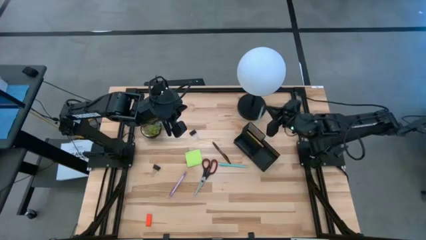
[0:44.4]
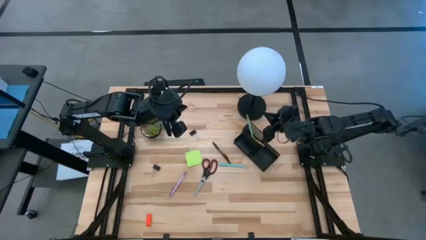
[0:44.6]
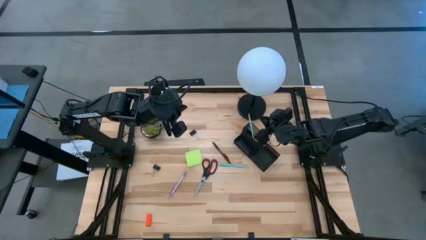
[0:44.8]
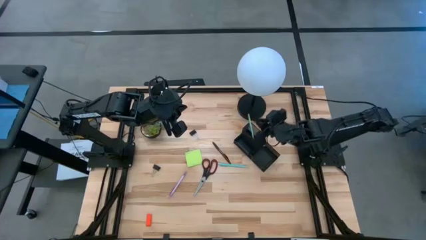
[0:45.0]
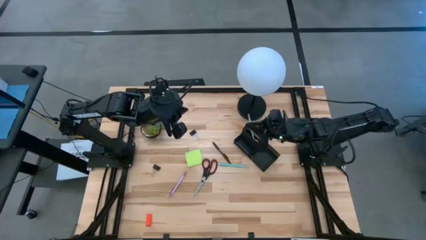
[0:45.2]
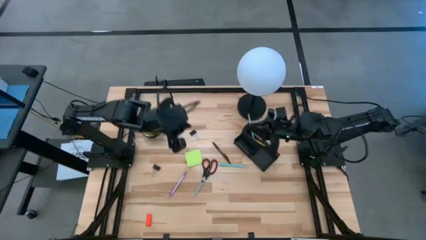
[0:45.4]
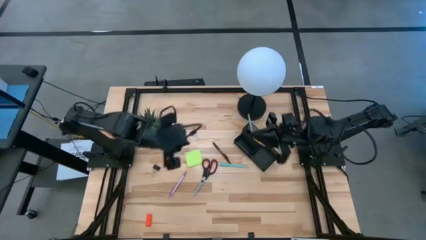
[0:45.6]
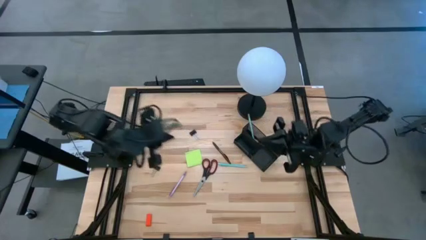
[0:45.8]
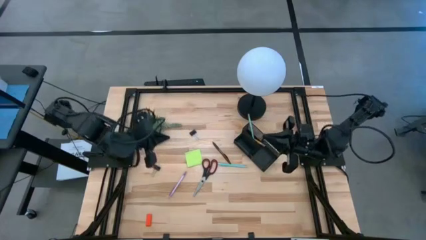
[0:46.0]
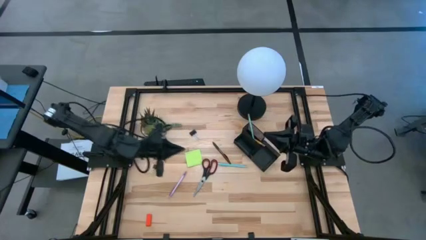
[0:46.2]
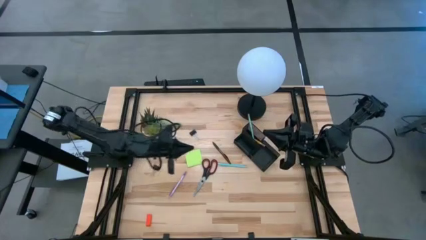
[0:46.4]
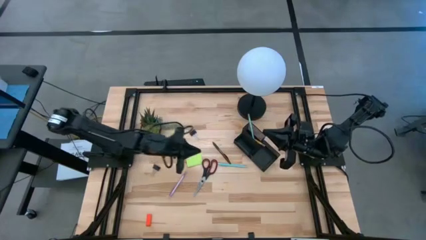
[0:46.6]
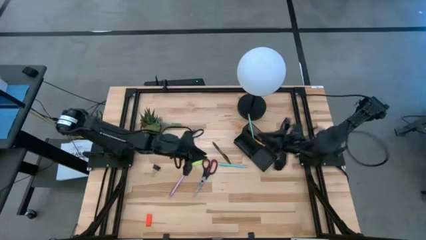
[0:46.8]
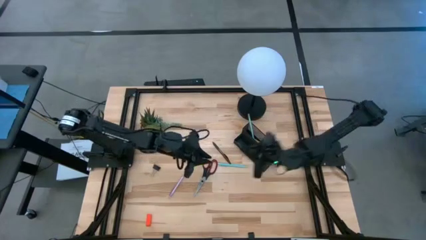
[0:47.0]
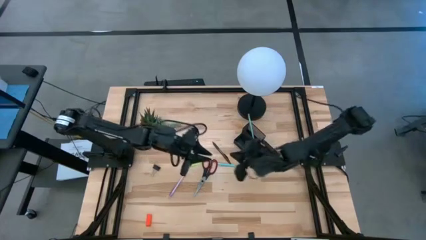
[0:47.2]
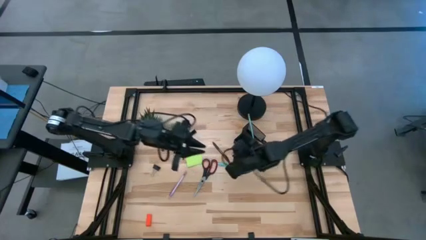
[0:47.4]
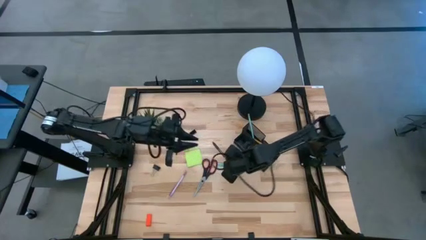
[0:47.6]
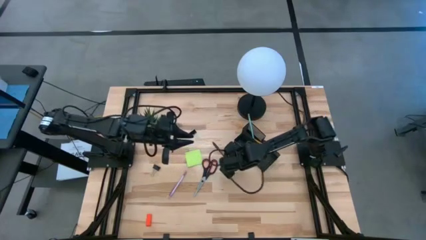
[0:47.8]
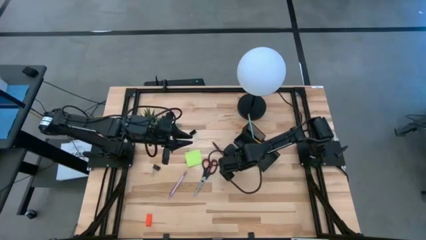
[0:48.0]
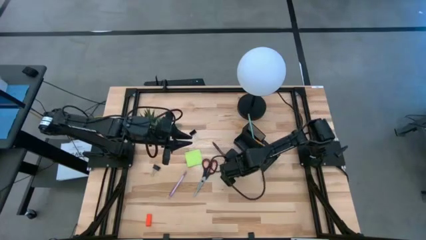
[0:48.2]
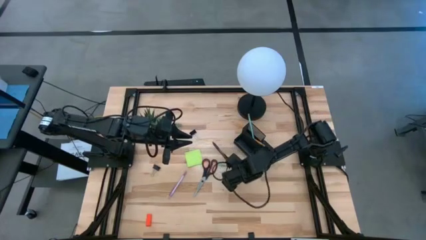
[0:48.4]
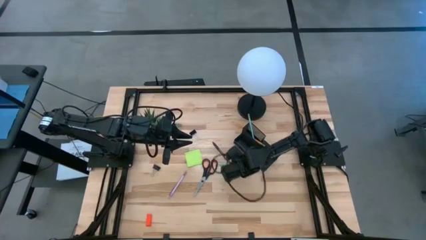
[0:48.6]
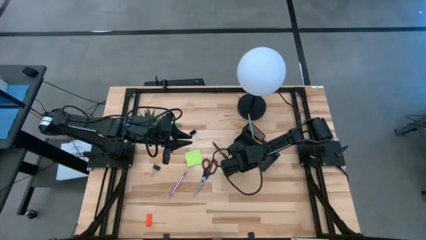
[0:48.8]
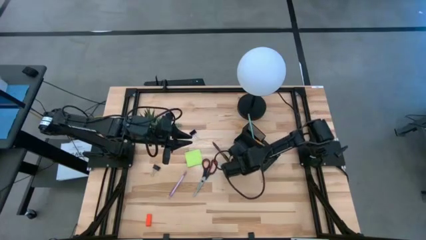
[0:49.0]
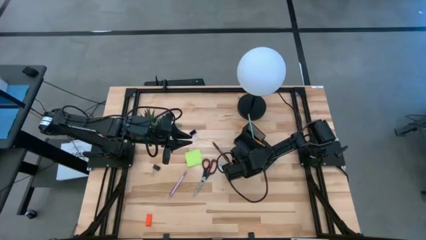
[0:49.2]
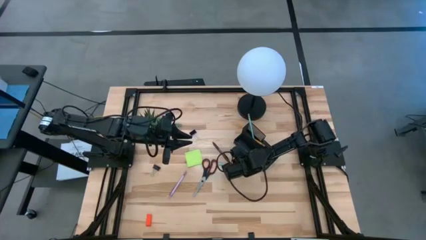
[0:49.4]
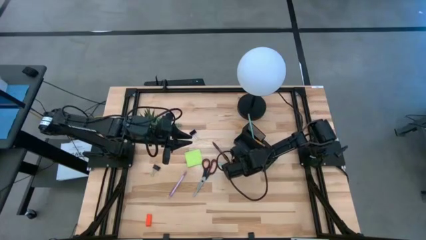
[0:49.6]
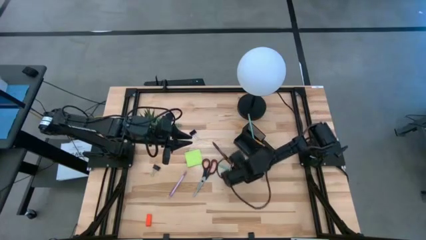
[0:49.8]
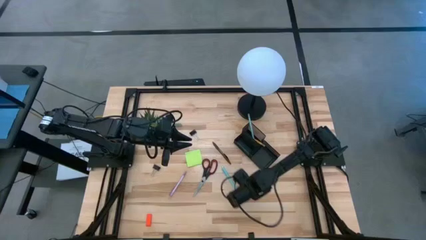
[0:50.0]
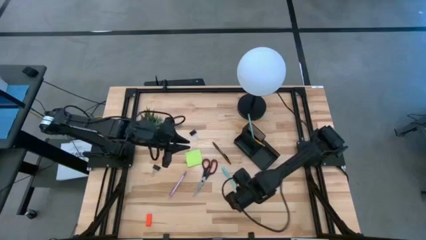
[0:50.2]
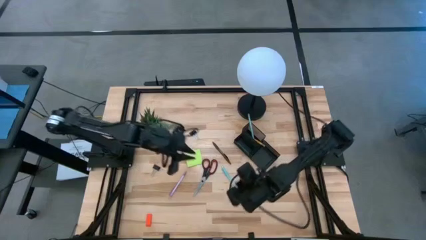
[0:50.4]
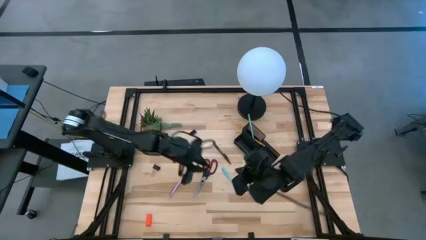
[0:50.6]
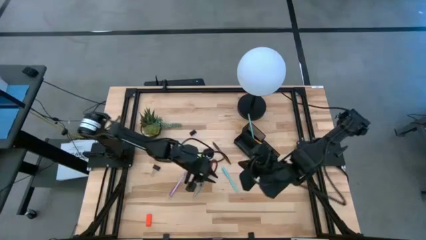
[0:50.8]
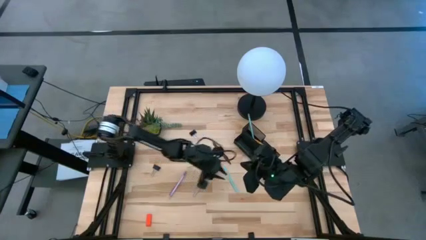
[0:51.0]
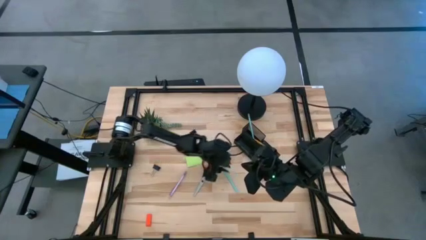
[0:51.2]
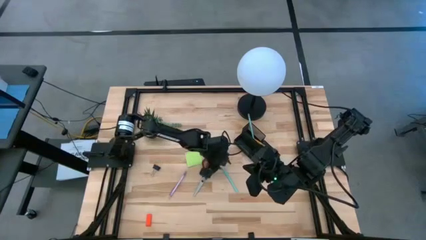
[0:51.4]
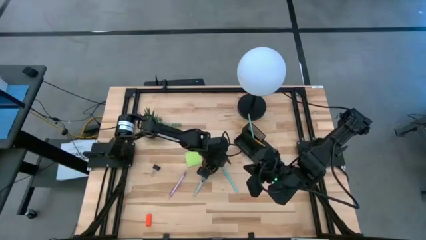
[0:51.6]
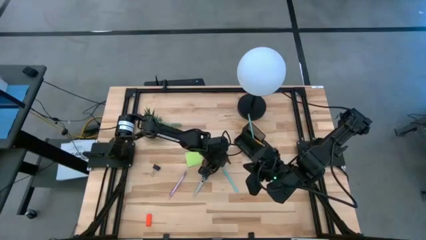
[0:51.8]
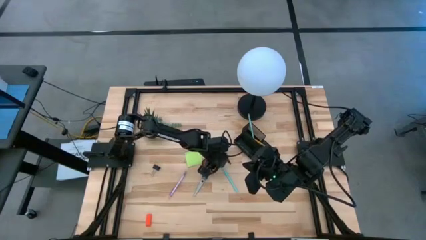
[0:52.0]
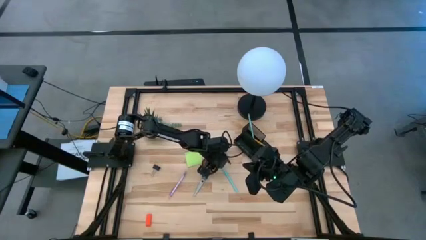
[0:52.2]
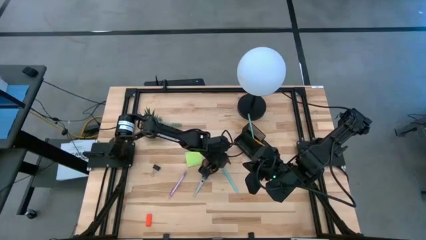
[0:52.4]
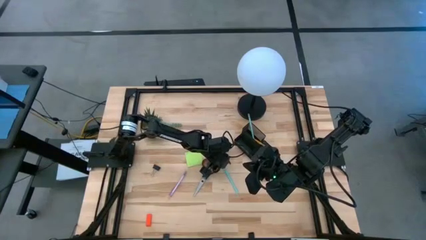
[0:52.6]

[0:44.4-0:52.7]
Task: Pick and place office supplies into organizer
Put the blue pen into the black desk organizer

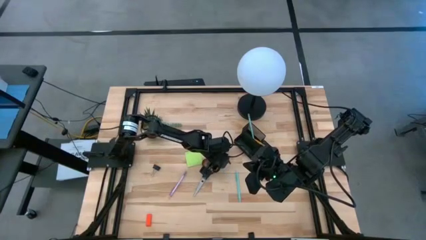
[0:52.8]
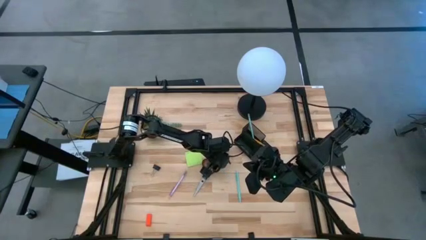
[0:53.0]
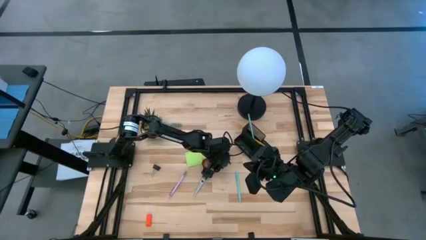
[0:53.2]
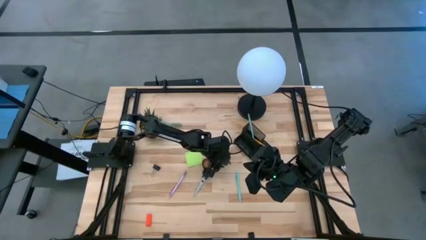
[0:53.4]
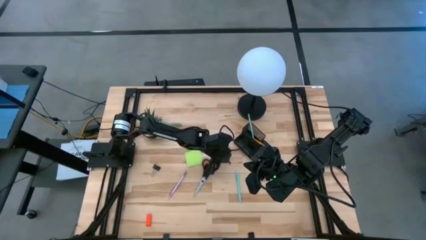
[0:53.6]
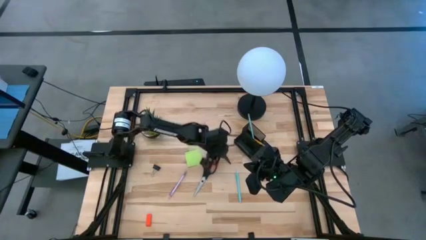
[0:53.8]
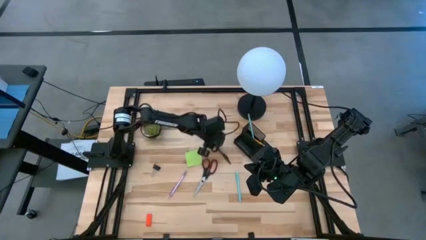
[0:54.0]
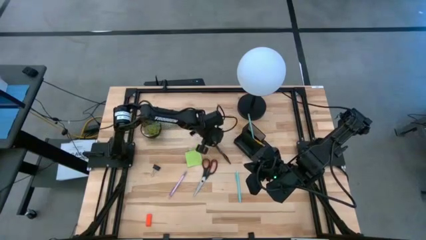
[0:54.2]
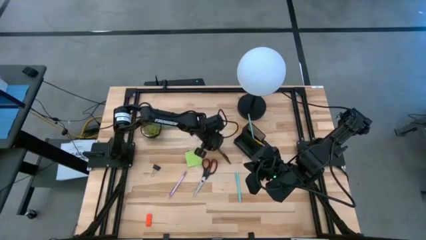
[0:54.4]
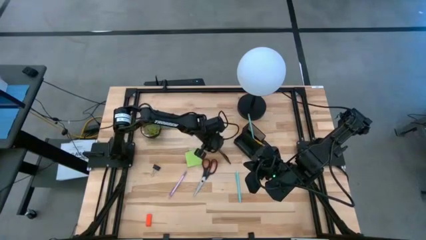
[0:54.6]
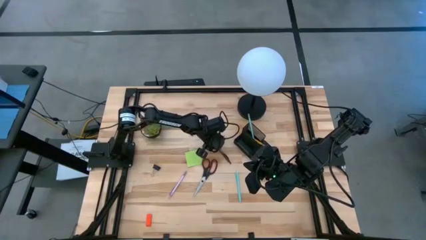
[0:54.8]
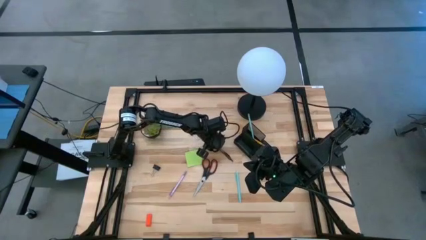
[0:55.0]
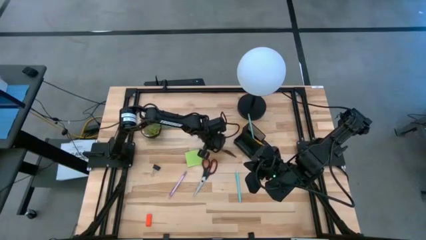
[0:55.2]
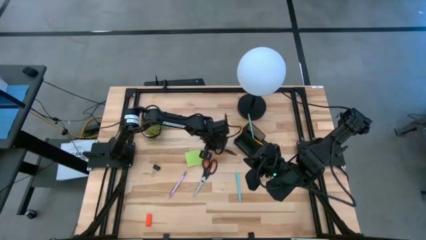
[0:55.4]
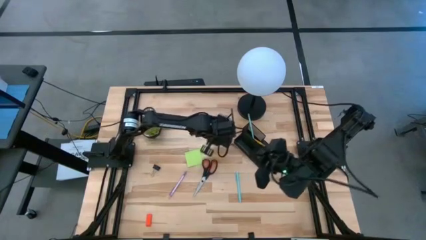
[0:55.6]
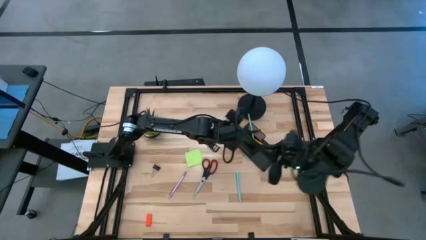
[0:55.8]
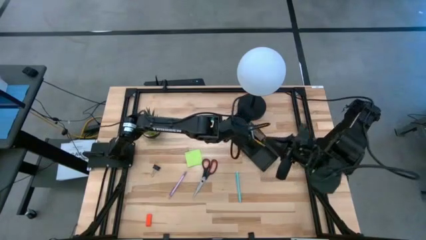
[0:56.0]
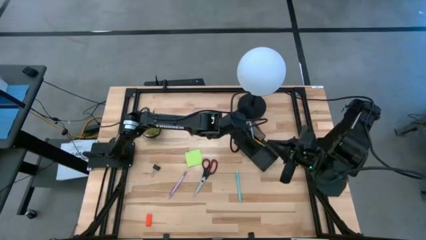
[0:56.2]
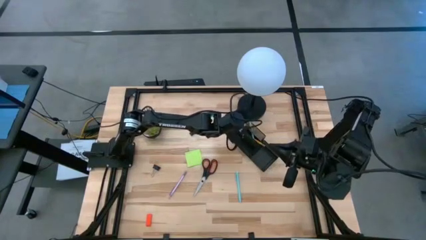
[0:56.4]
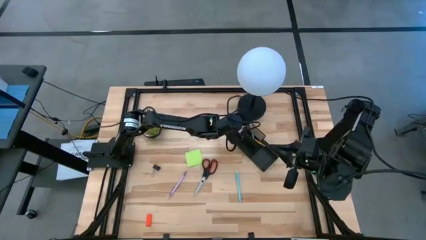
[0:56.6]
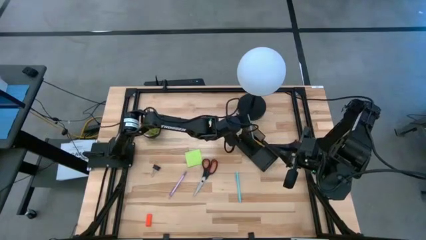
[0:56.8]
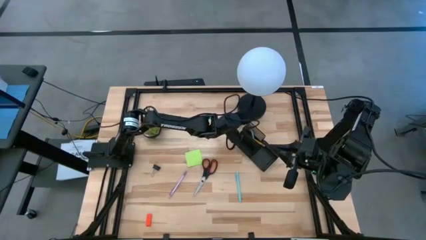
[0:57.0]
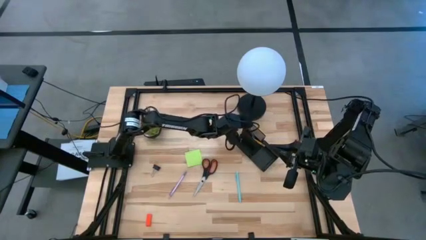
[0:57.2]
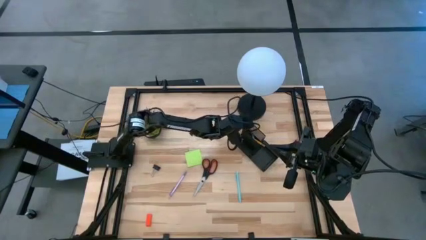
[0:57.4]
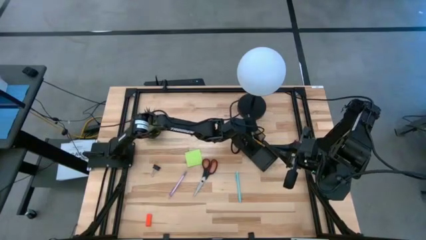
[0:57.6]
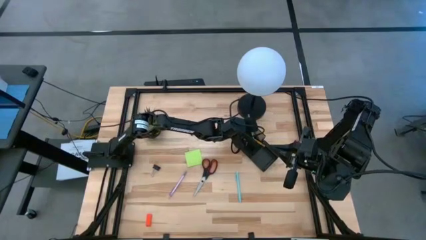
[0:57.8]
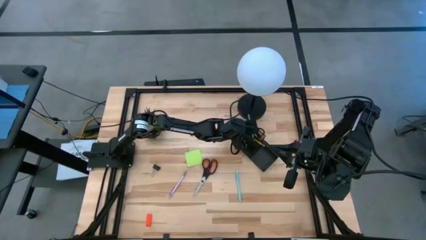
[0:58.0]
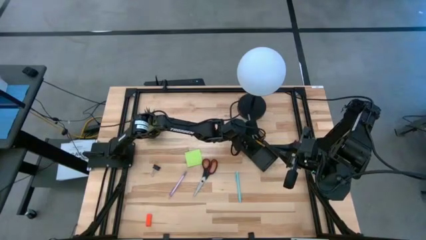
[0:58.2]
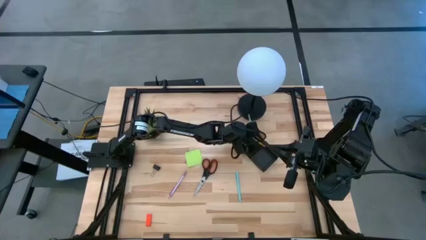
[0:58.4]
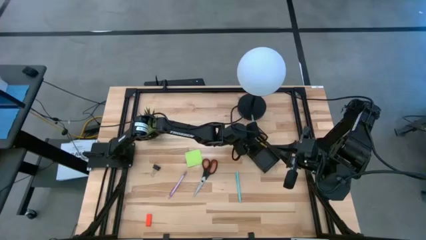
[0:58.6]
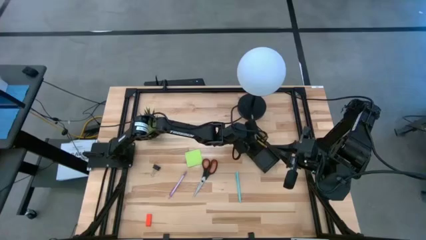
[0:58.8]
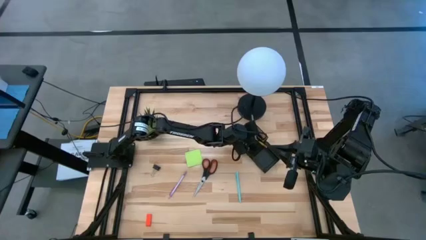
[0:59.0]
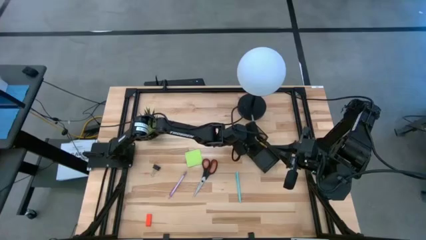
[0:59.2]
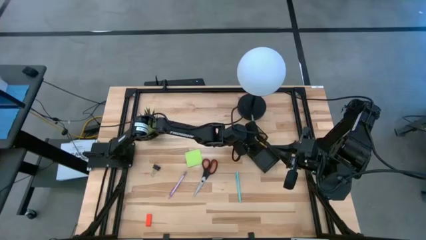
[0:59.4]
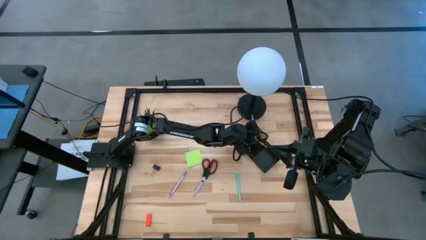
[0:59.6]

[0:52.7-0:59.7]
Put the black pen into the black desk organizer
